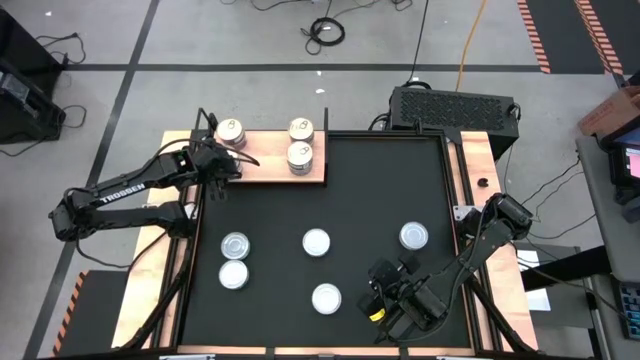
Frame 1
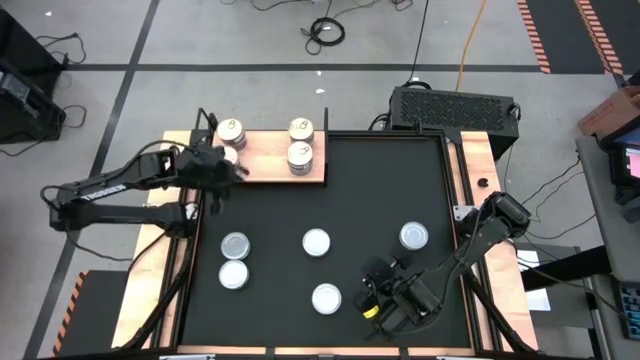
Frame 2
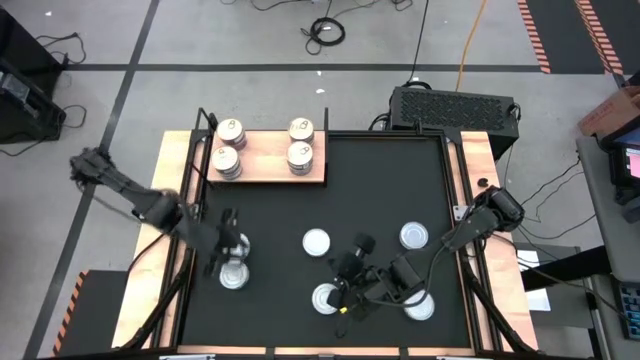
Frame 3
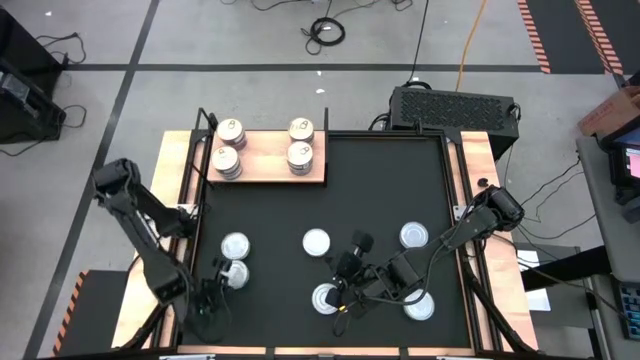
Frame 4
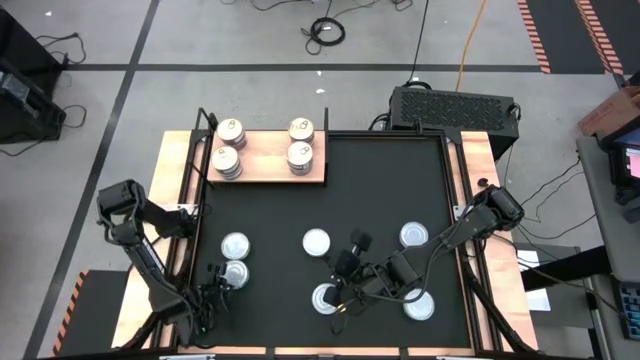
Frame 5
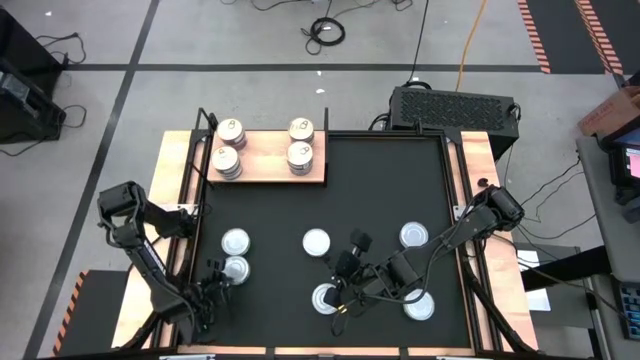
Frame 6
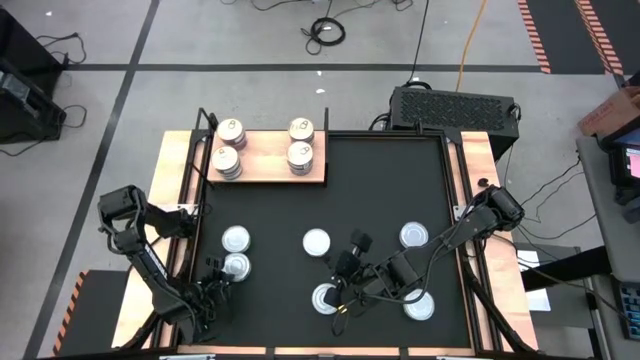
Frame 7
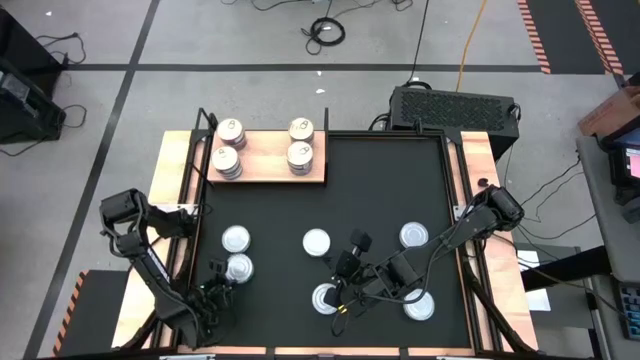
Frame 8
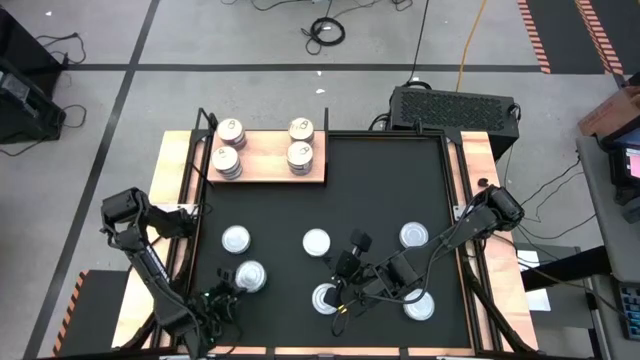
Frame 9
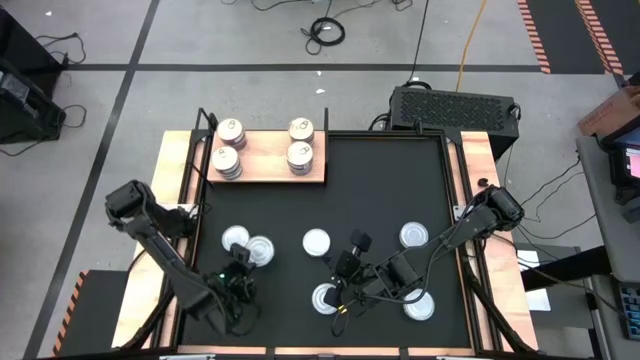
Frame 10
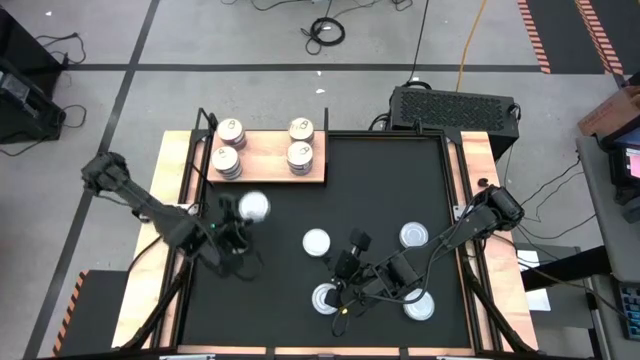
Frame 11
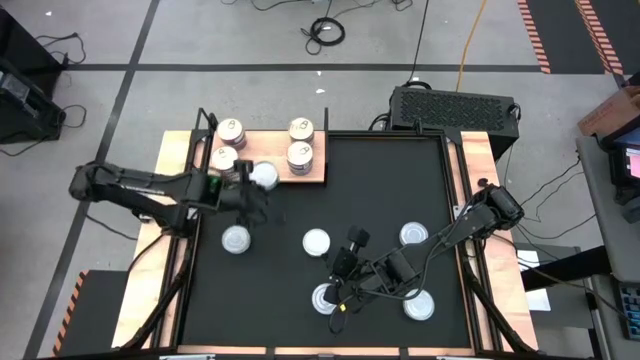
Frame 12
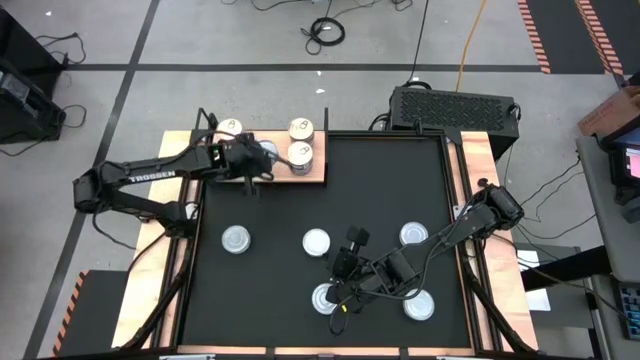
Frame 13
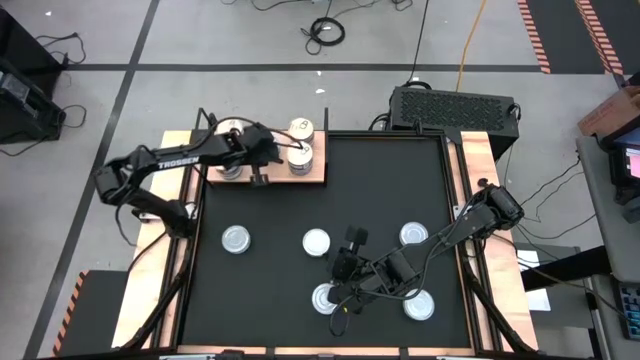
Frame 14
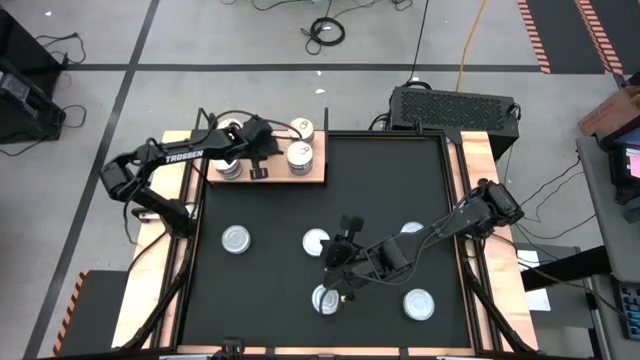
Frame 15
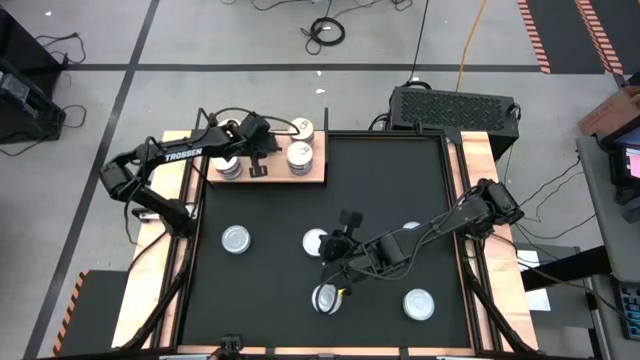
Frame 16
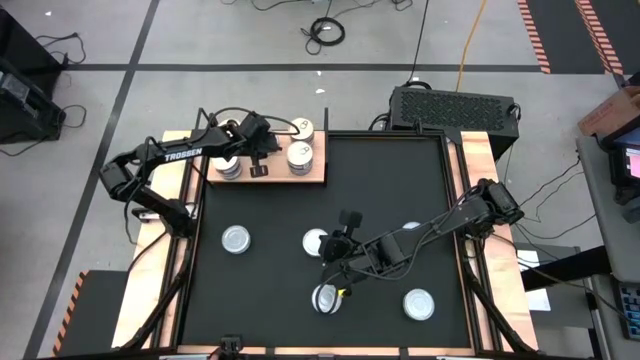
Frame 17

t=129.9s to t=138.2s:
Task: Stack canned seafood by type on shelf
Put the green tuna can on the shelf

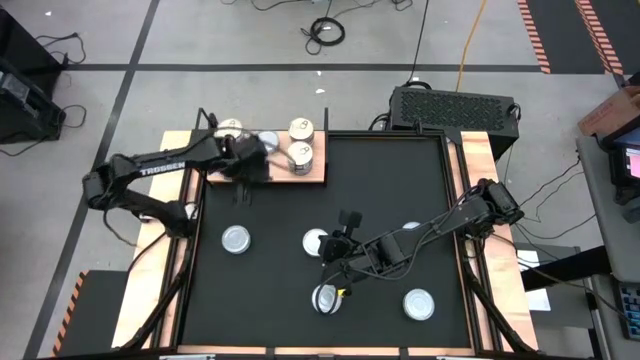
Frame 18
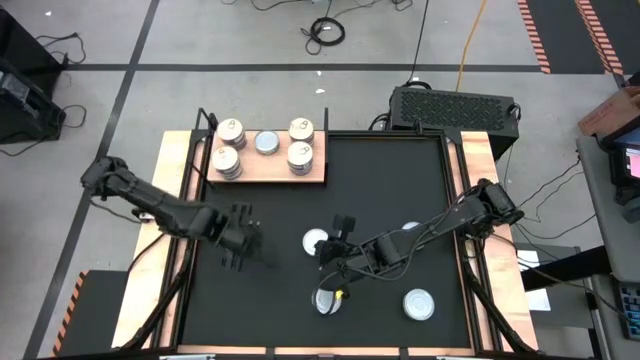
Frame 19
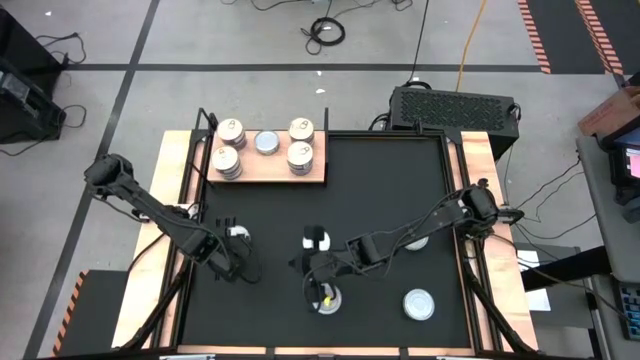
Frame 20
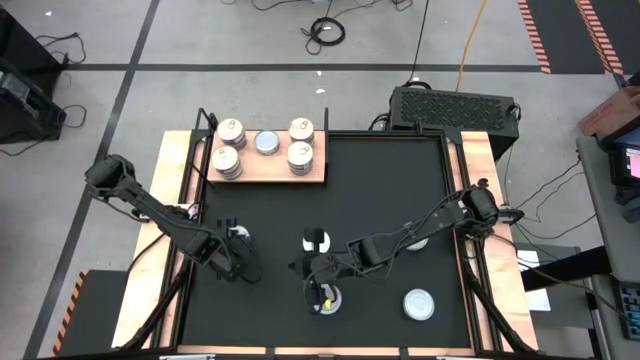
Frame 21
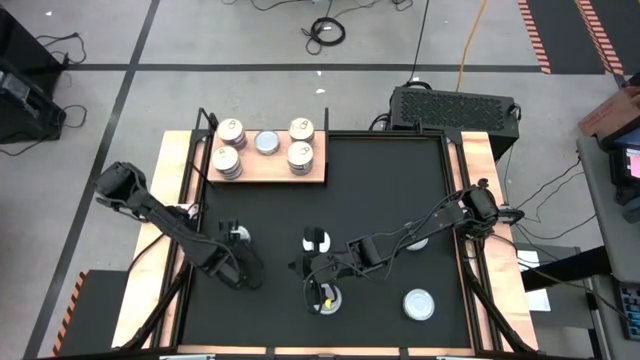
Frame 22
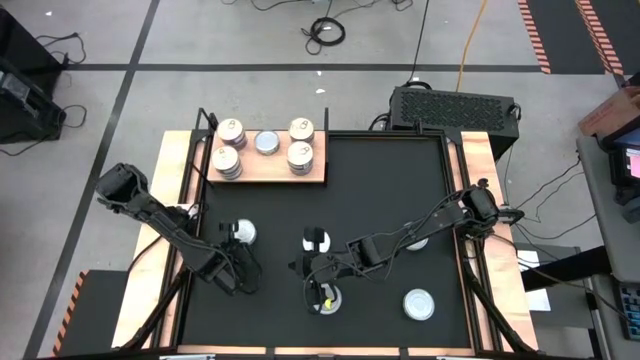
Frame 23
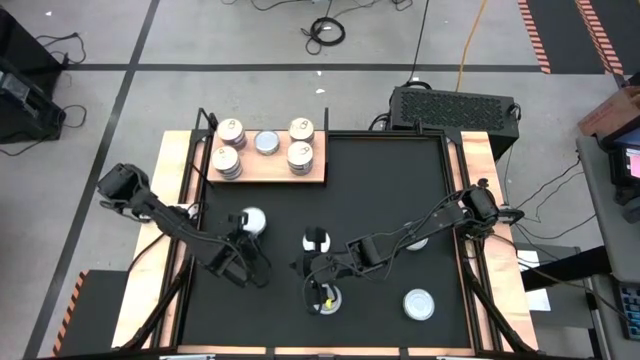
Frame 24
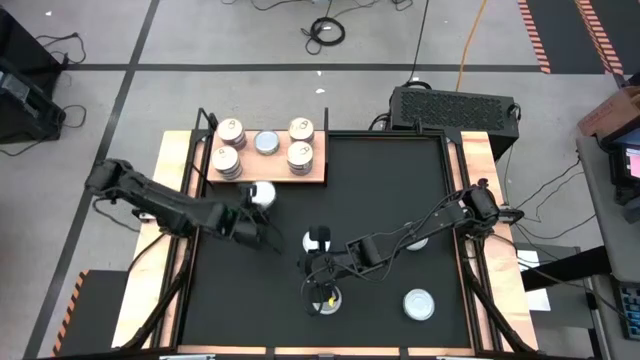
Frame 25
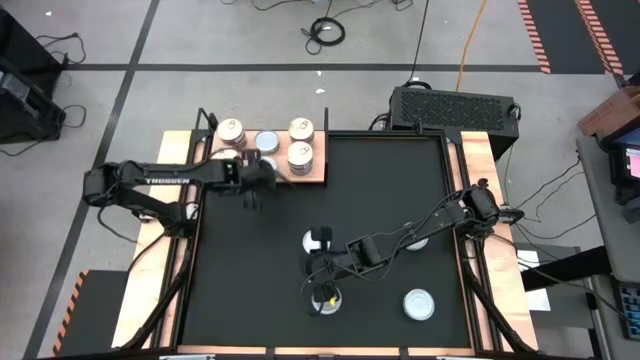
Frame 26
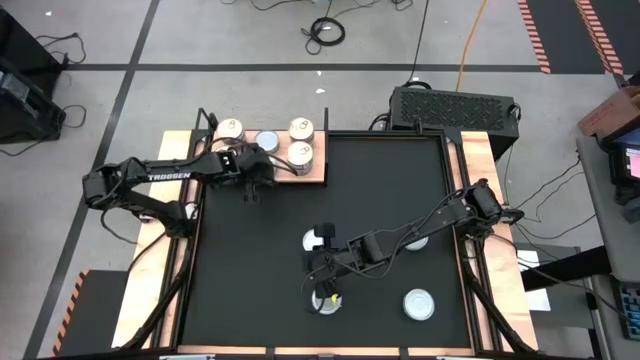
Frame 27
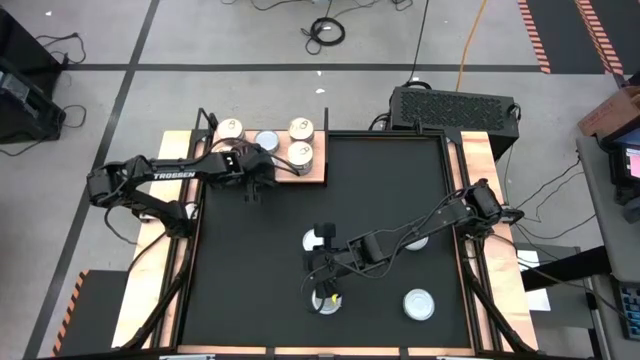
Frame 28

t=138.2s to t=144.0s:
Put the green tuna can on the shelf

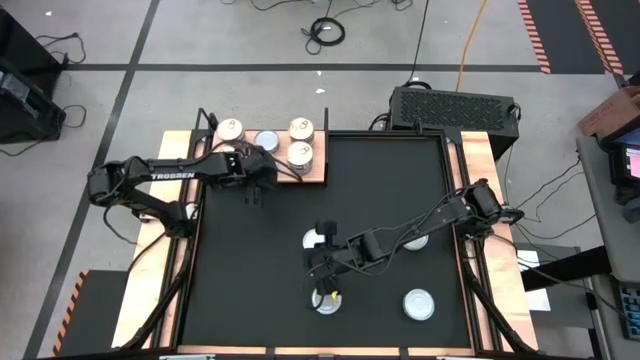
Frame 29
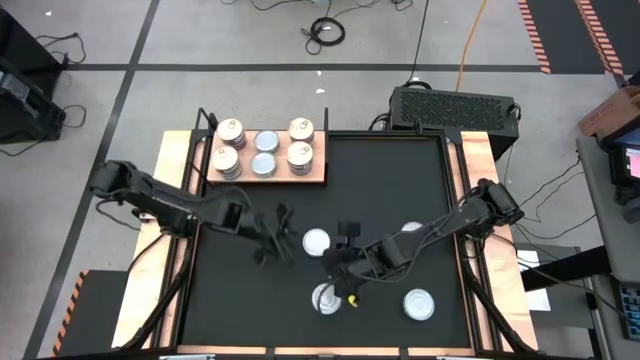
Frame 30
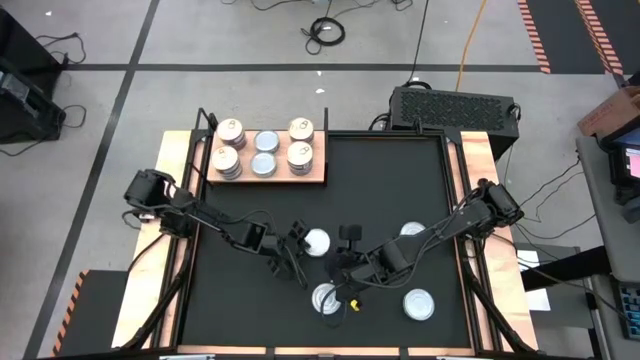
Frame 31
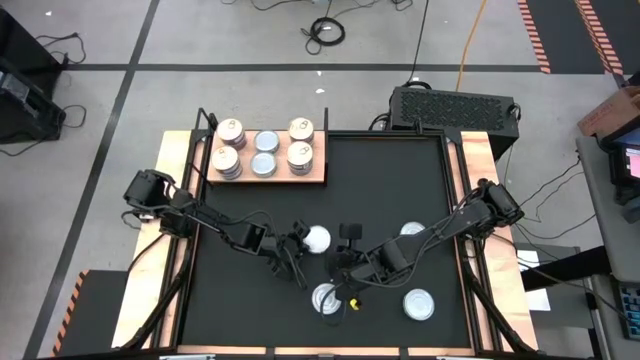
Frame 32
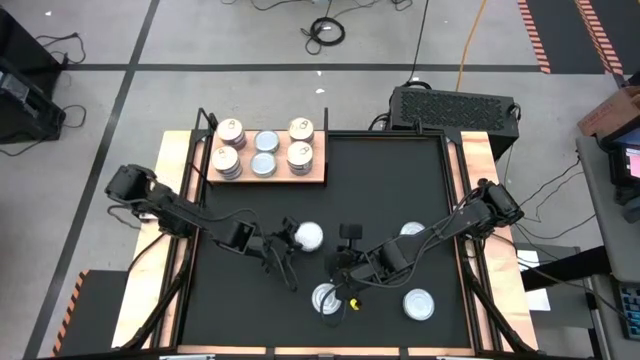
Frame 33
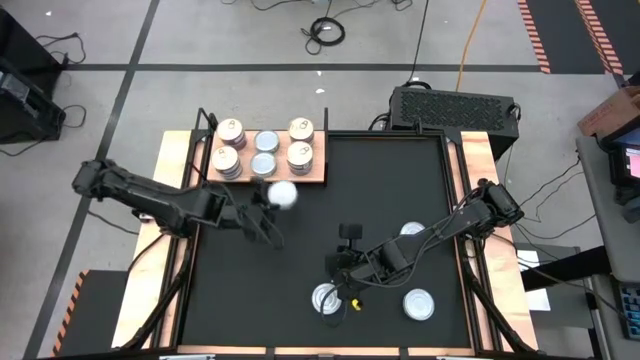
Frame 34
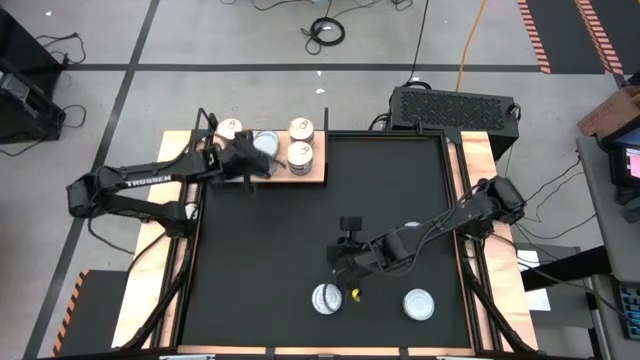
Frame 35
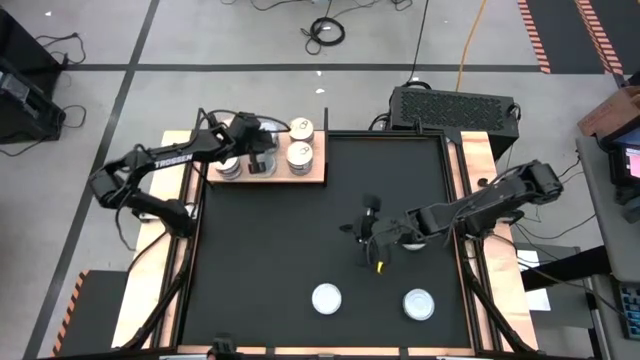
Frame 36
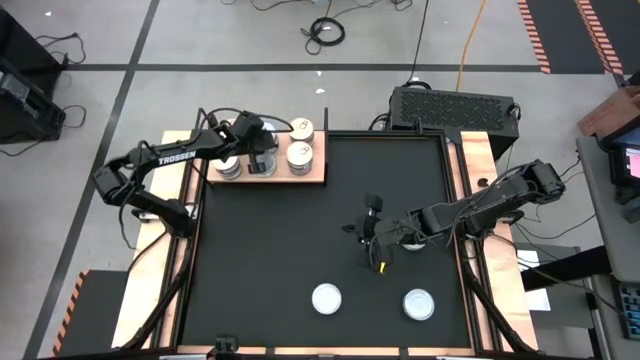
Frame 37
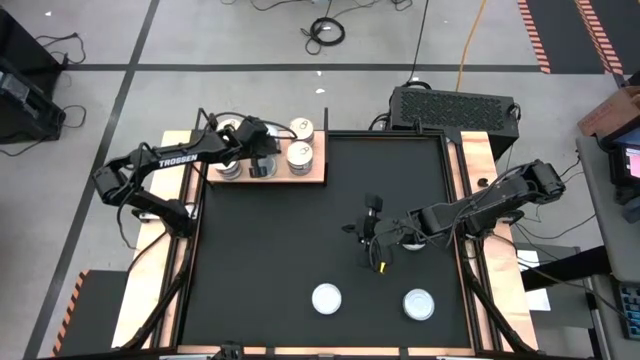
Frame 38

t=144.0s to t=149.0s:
Stack the green tuna can on top of the other green tuna can on the shelf

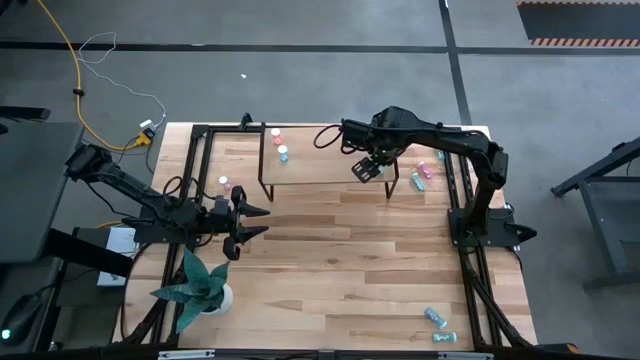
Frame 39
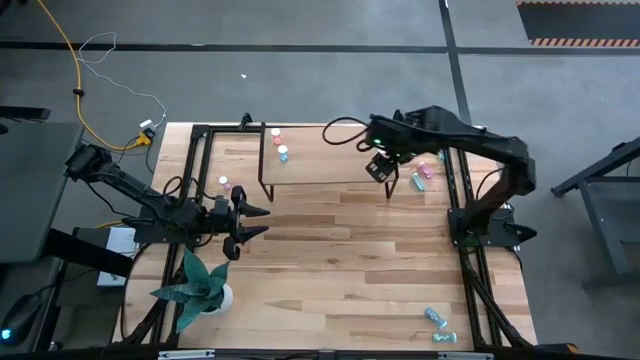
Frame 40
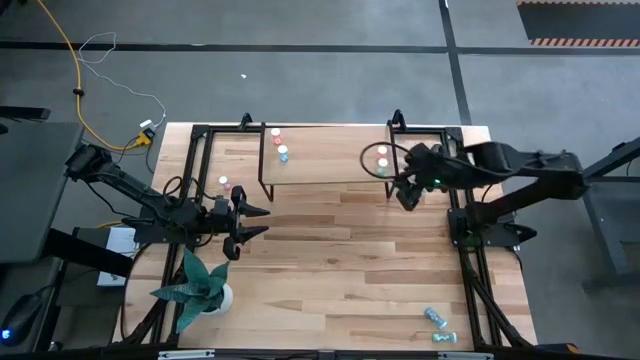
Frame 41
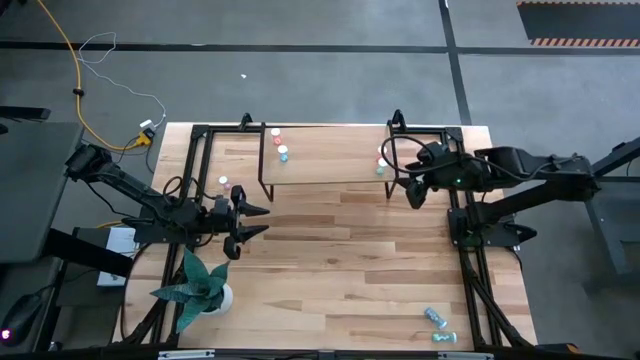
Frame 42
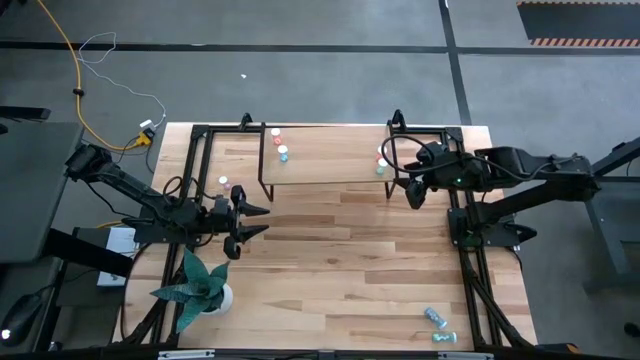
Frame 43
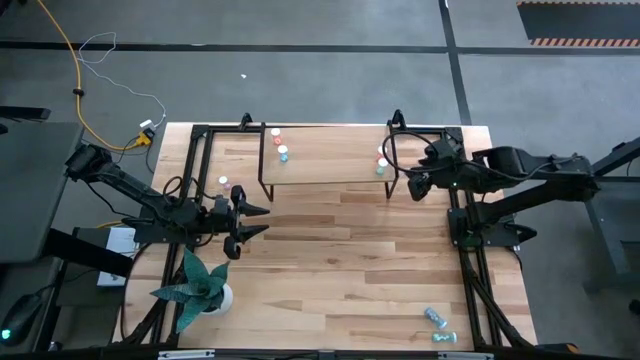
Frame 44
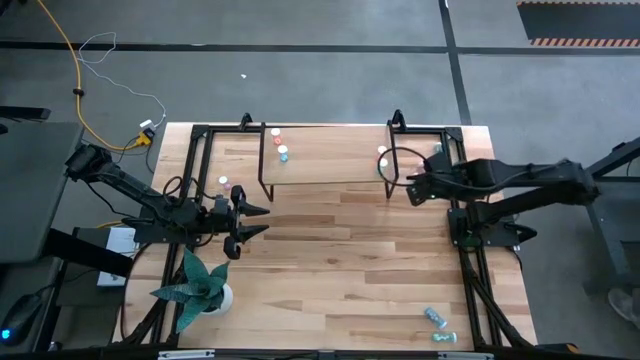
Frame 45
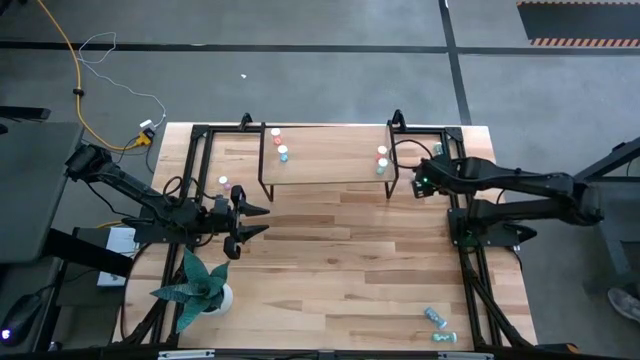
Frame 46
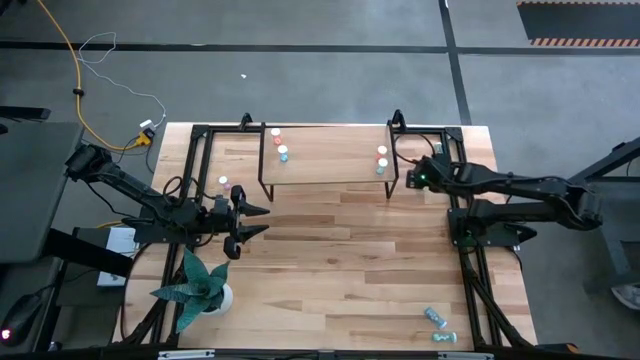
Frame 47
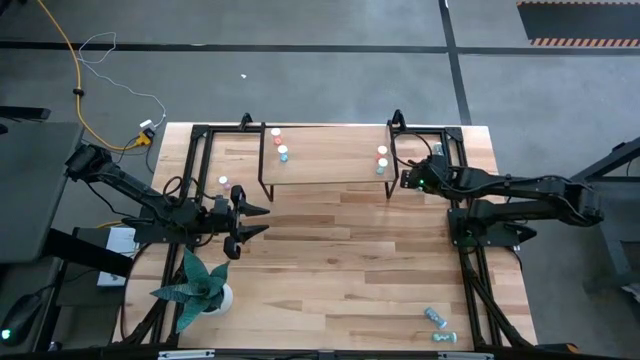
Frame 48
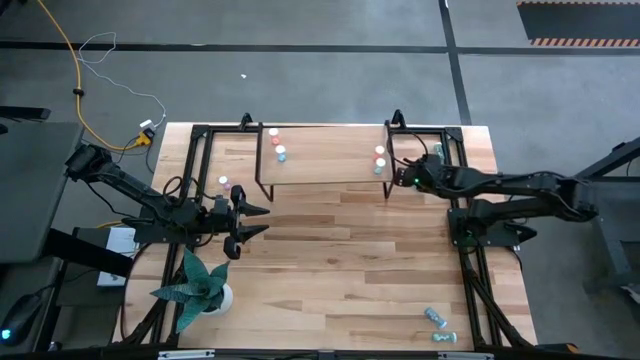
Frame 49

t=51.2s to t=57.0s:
Task: Pick and place medicine bottles onto shelf by color
Adjust the shelf on the table
